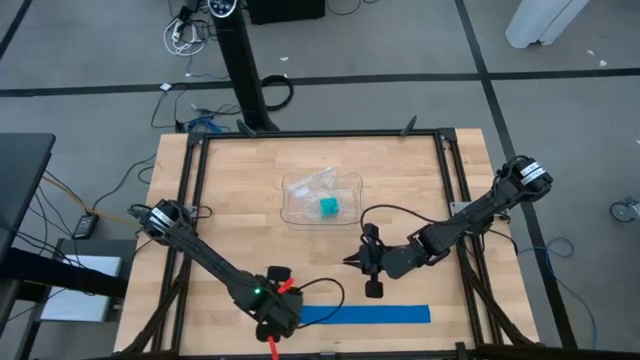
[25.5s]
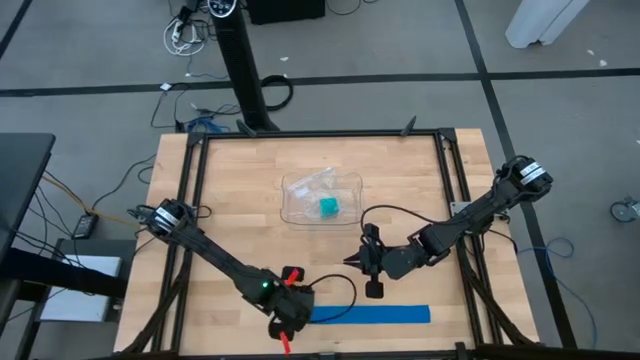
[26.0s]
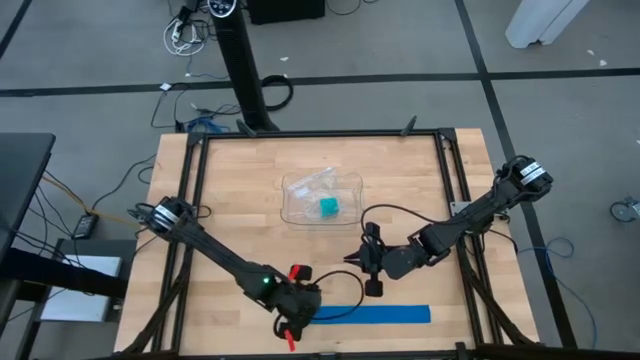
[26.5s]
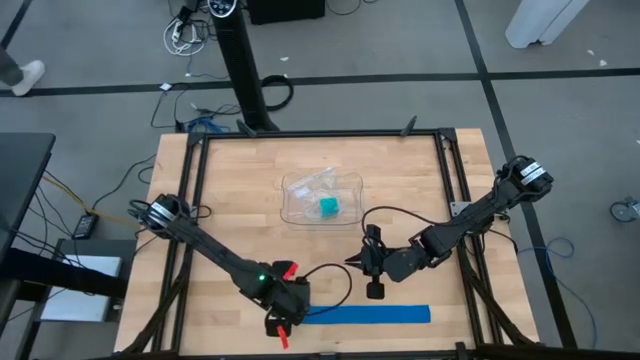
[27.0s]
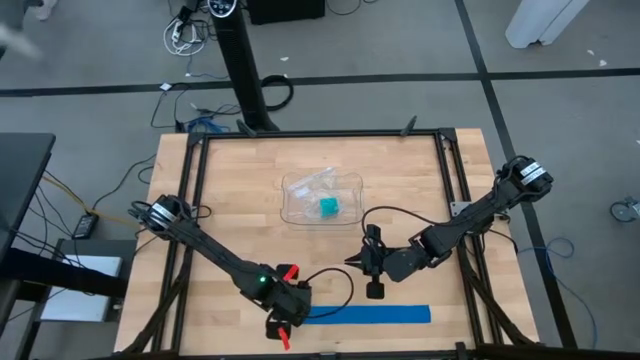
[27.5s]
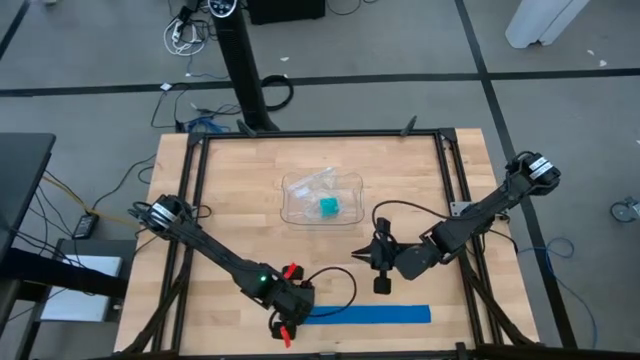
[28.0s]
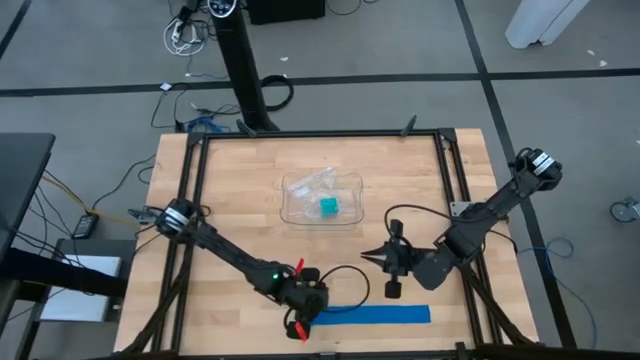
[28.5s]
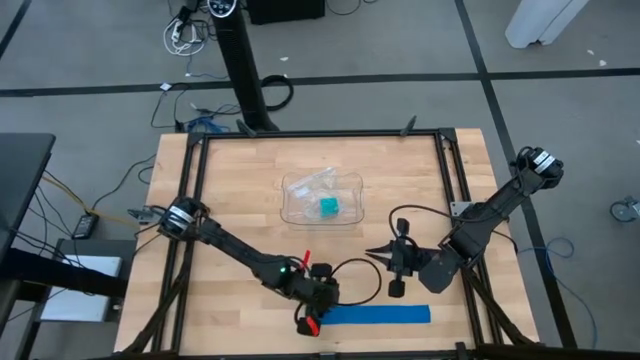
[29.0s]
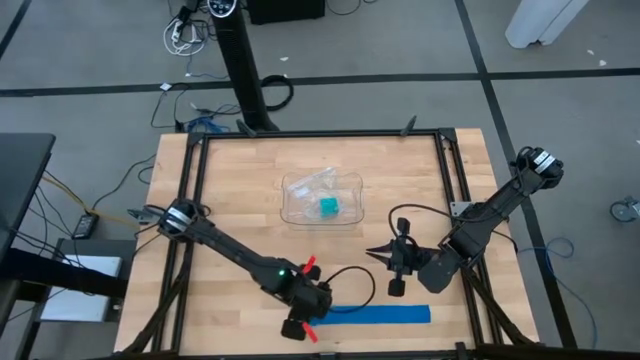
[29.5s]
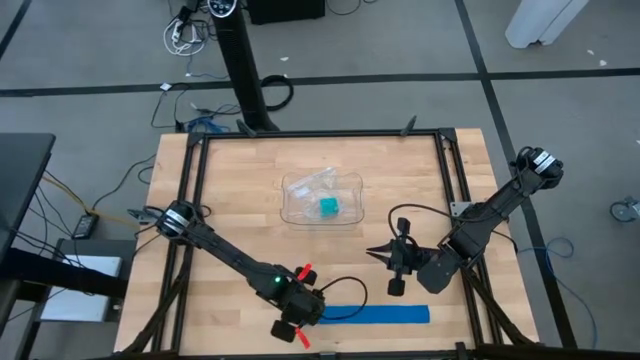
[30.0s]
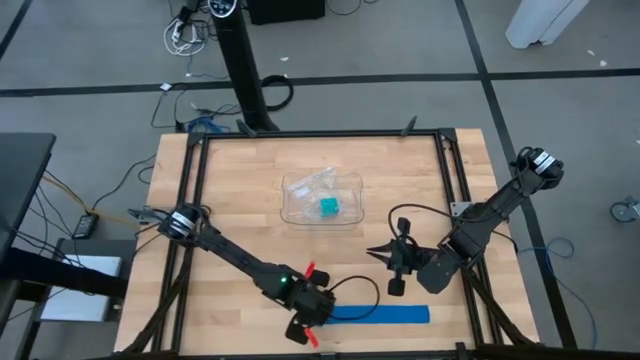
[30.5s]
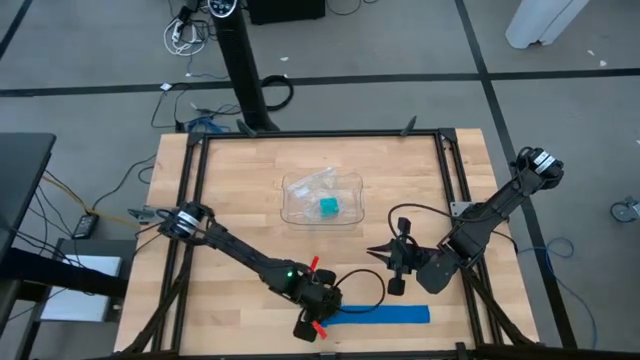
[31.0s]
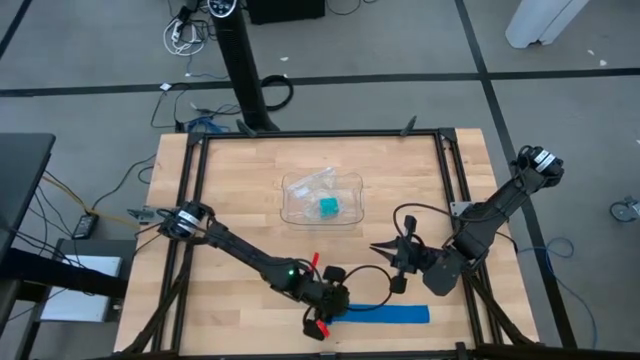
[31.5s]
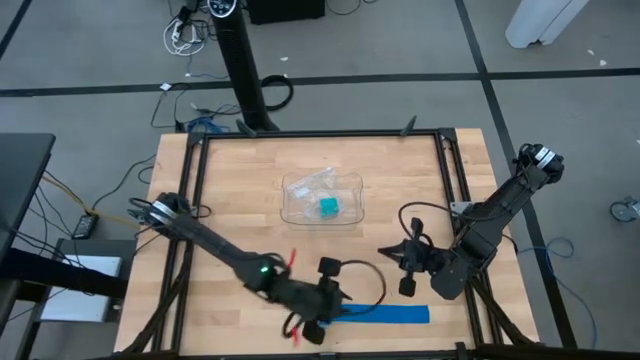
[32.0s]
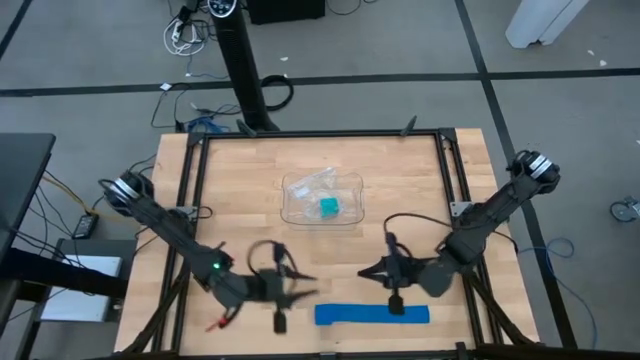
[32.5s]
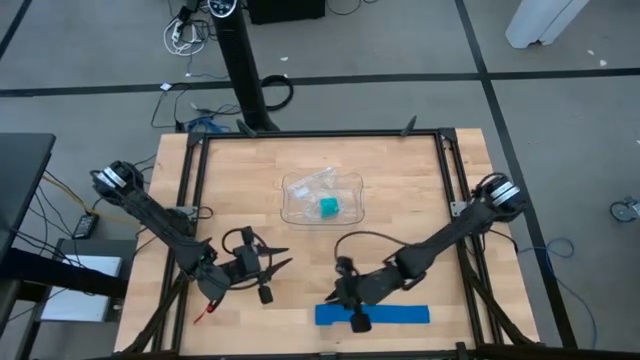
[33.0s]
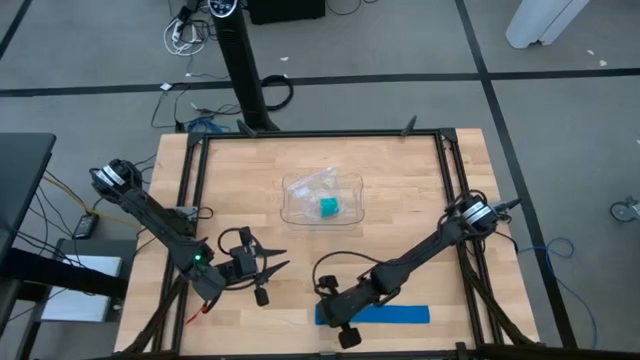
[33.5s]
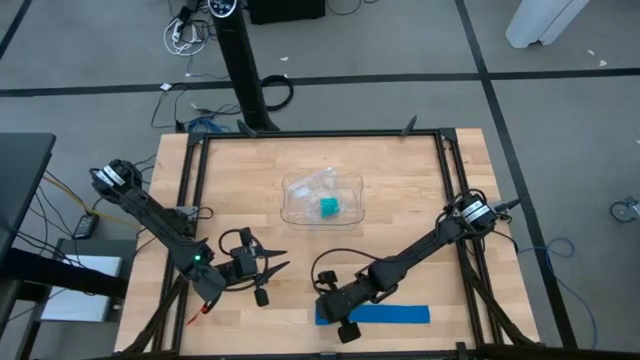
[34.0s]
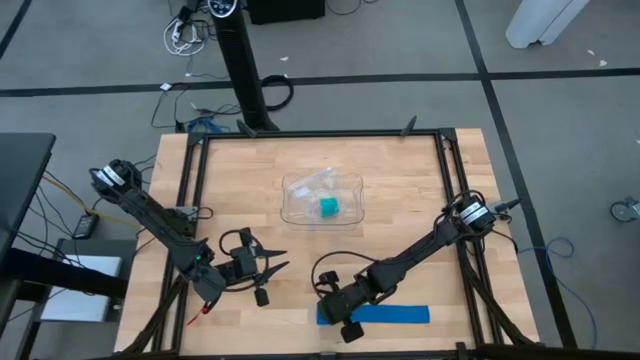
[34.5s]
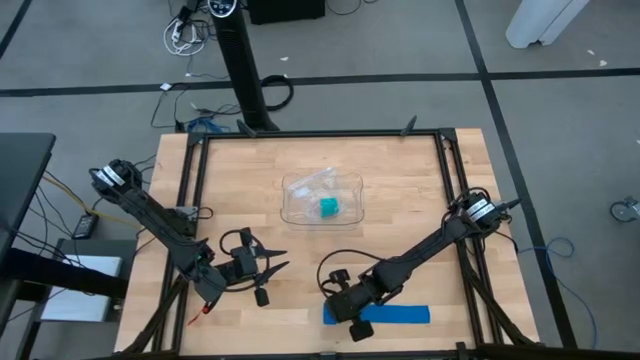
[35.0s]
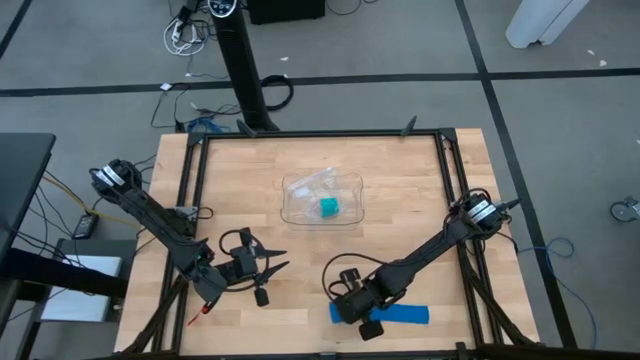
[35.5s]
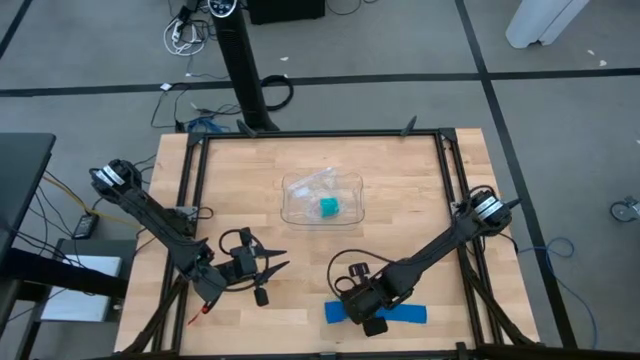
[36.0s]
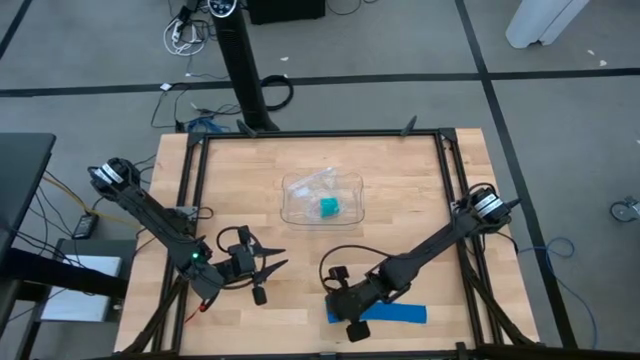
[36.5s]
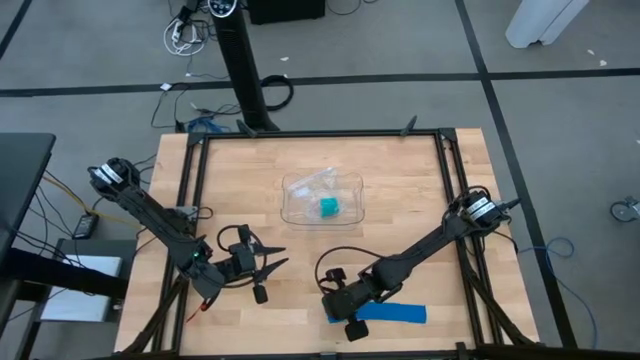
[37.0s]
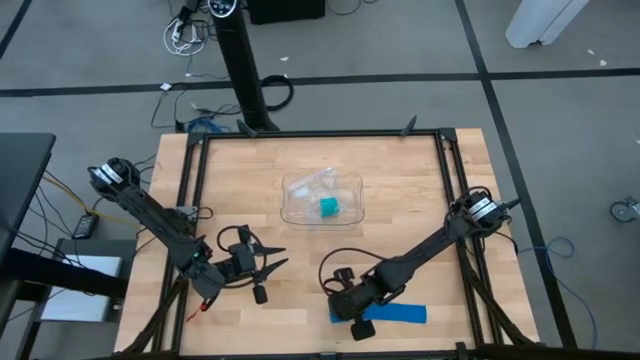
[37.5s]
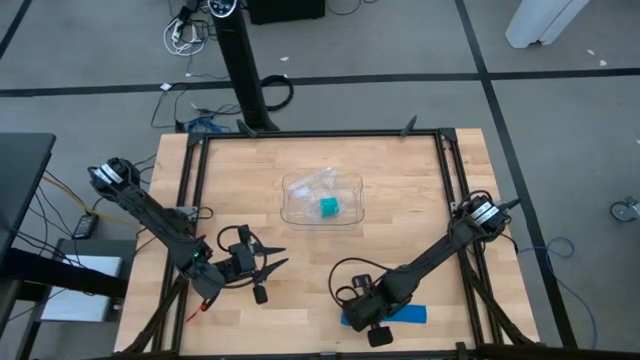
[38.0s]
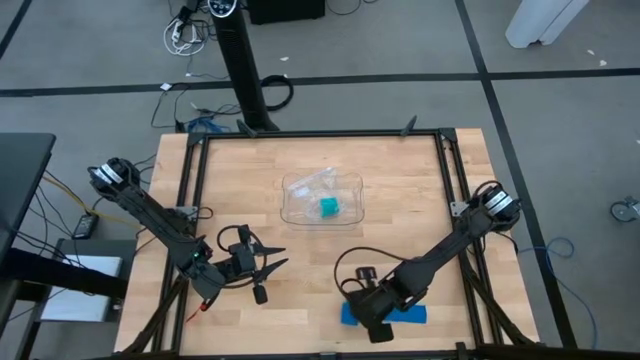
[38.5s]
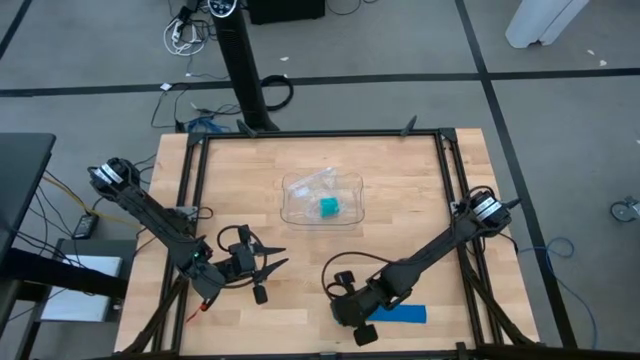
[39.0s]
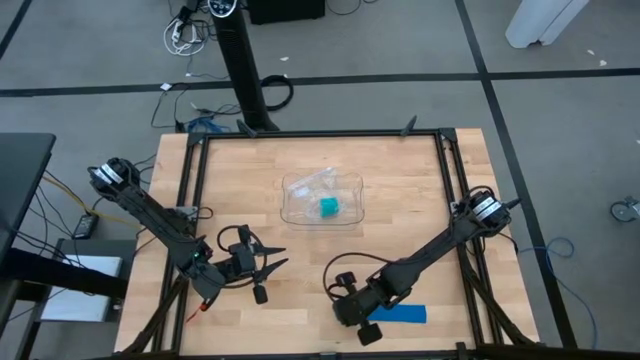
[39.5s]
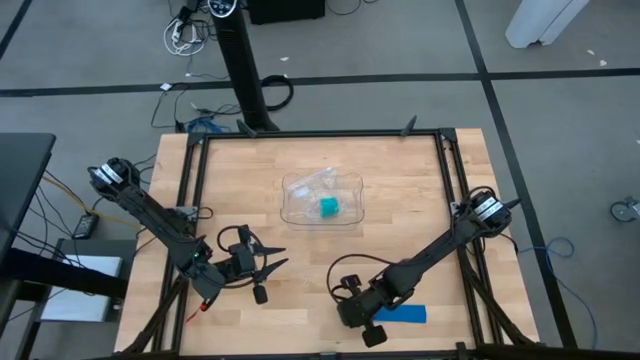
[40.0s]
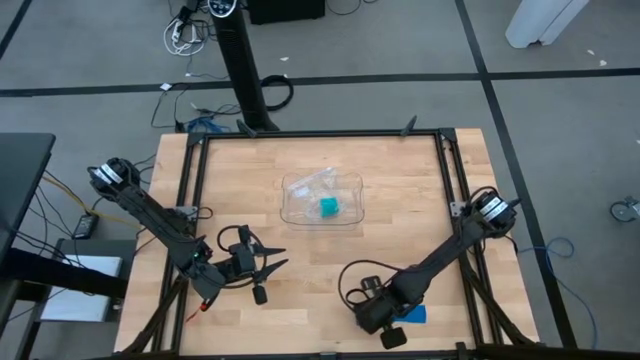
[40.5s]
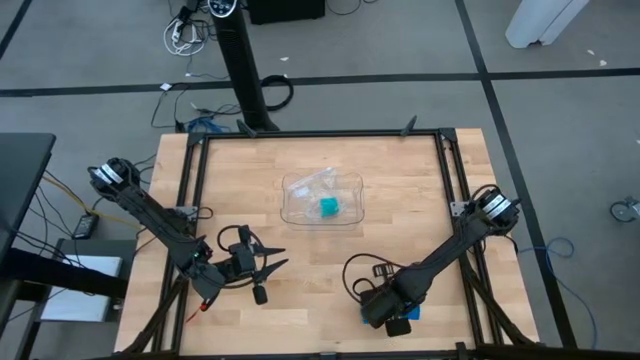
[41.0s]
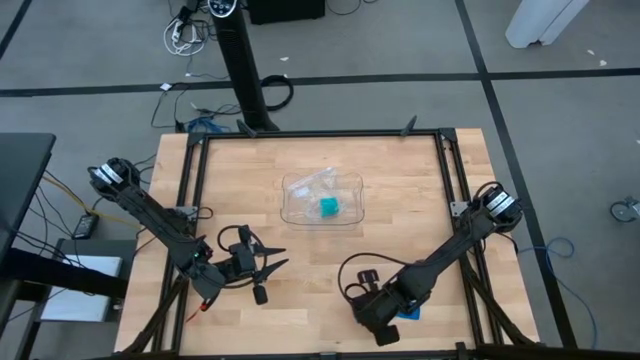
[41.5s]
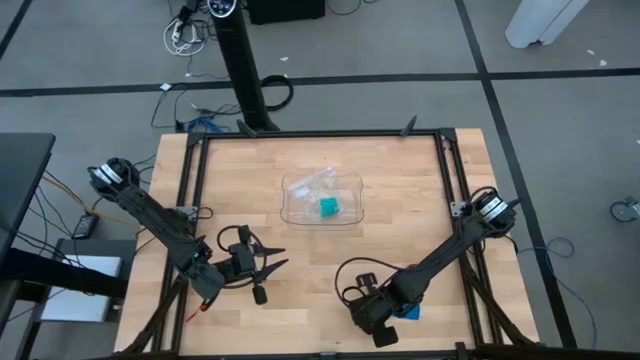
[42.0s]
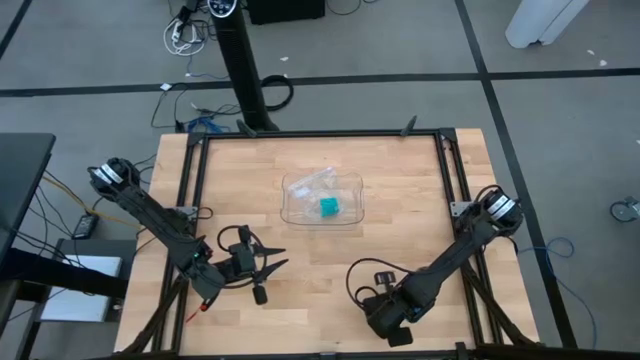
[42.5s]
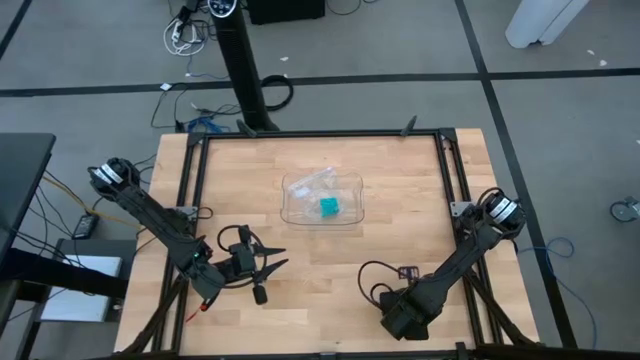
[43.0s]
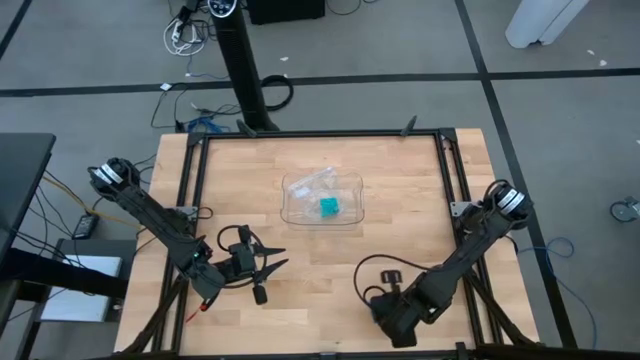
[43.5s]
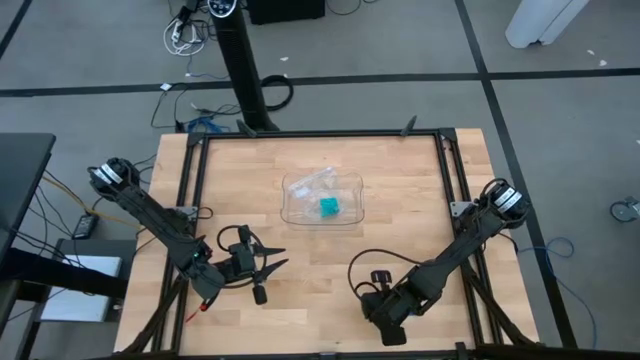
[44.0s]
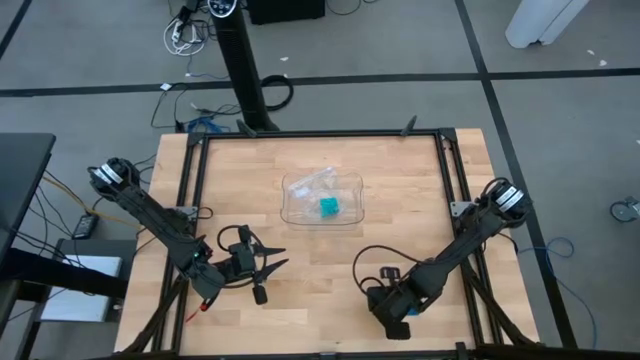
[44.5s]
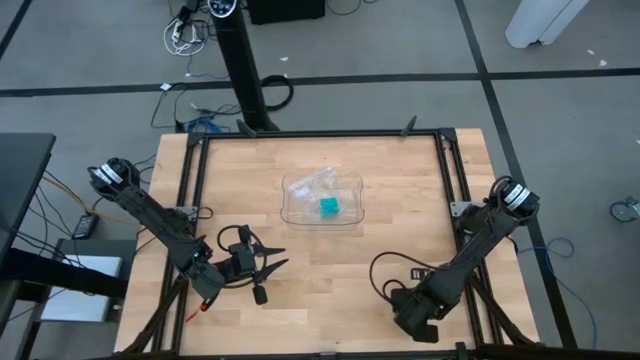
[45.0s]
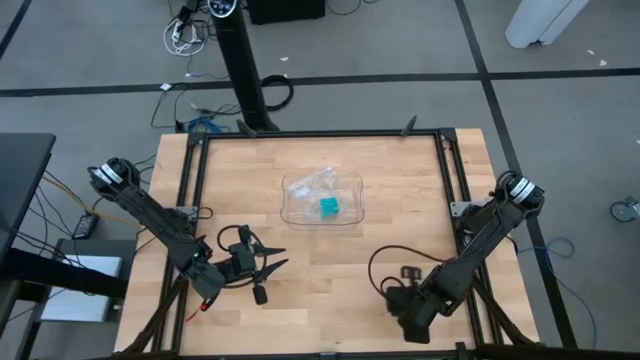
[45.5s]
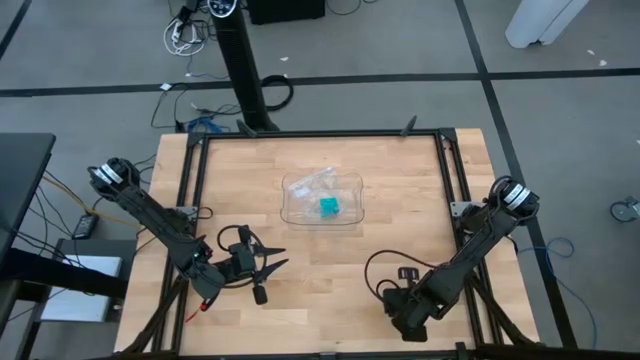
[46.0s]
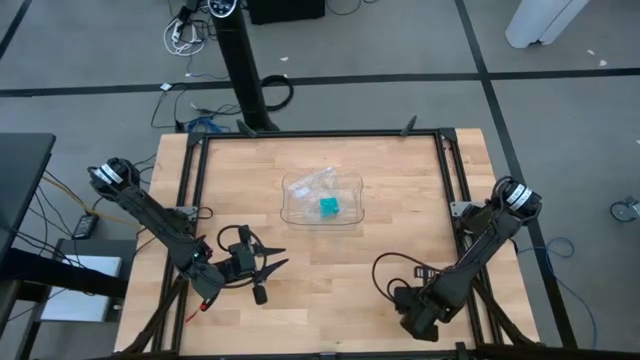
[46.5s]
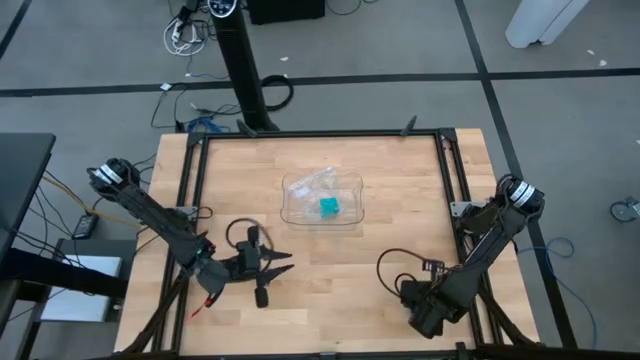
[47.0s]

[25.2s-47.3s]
Task: Roll bandage
Roll the blue bandage
